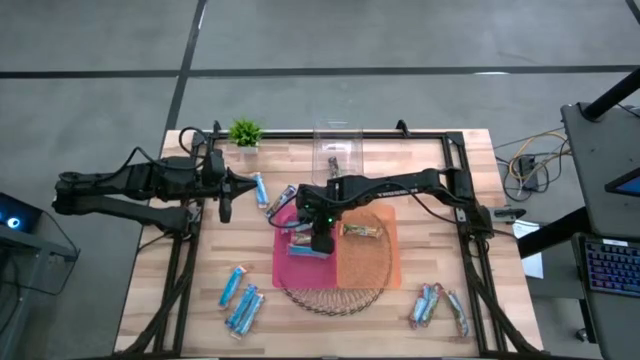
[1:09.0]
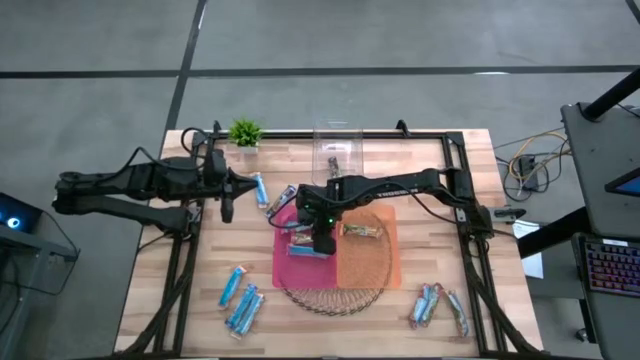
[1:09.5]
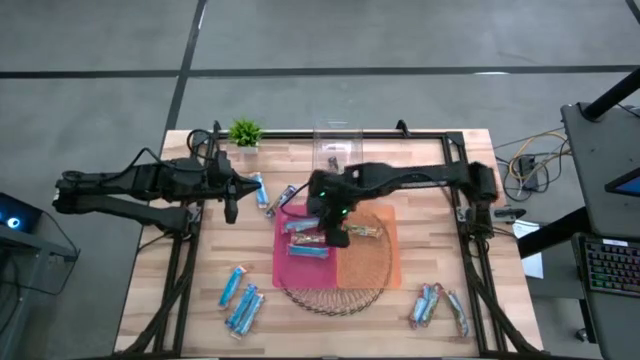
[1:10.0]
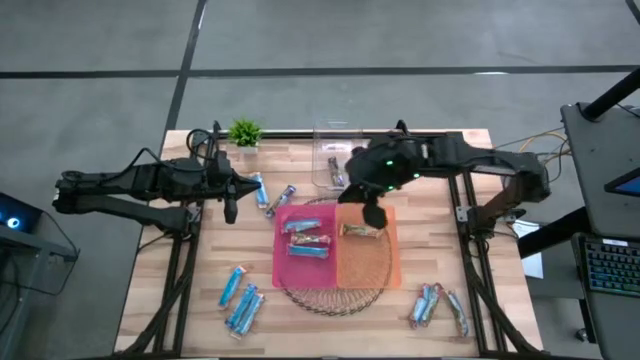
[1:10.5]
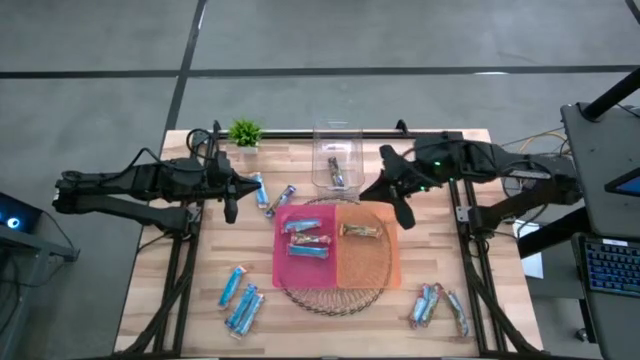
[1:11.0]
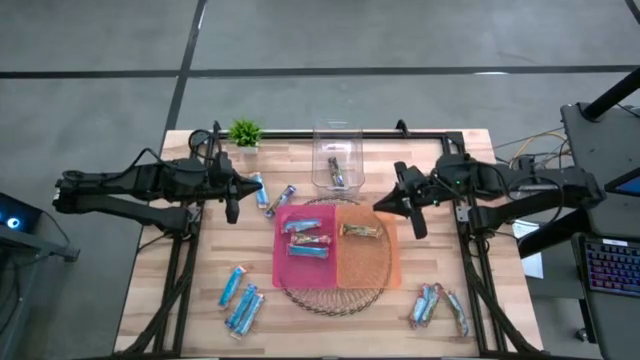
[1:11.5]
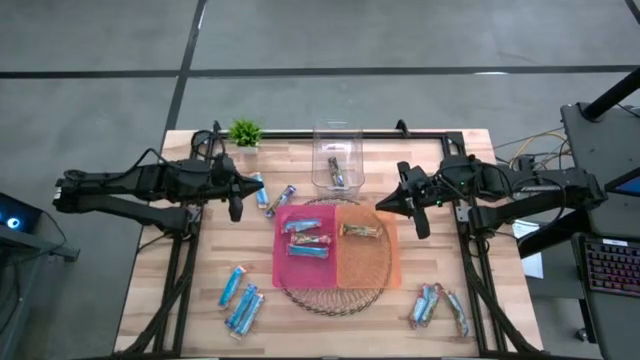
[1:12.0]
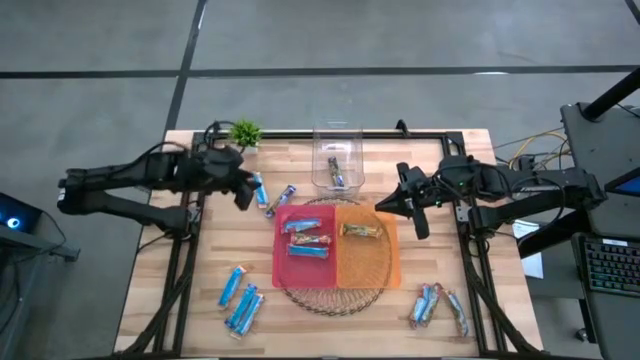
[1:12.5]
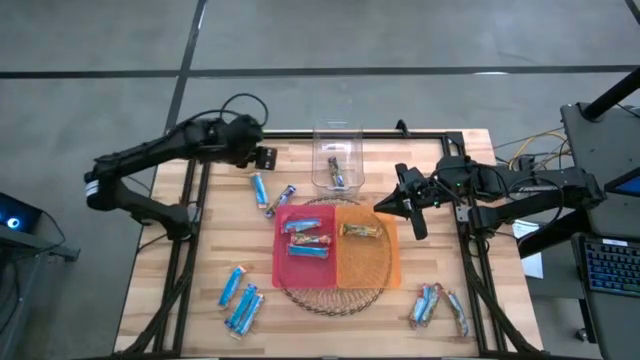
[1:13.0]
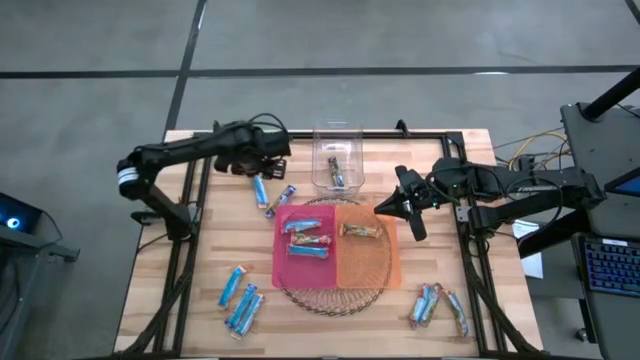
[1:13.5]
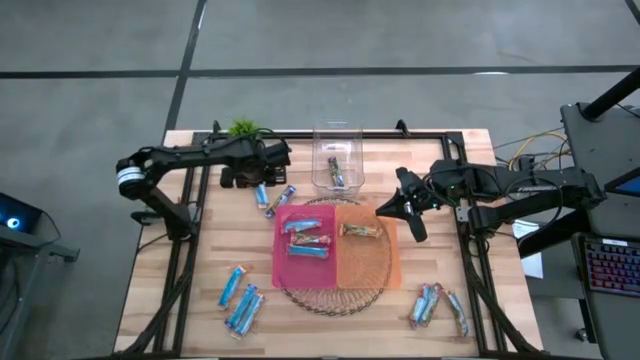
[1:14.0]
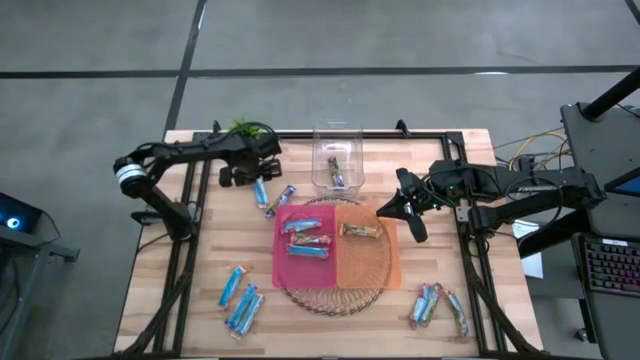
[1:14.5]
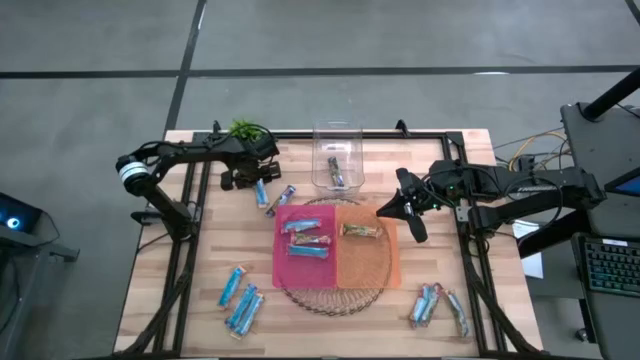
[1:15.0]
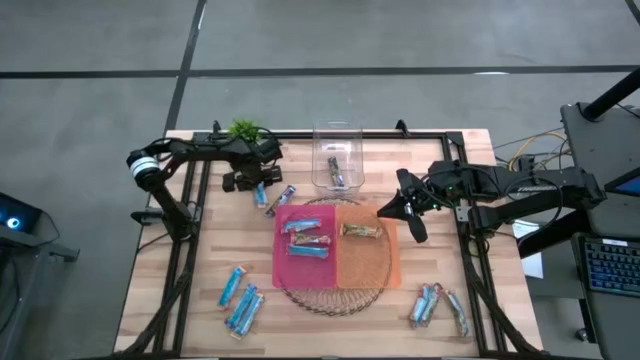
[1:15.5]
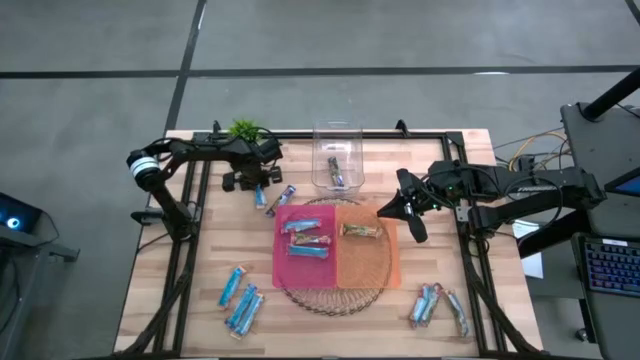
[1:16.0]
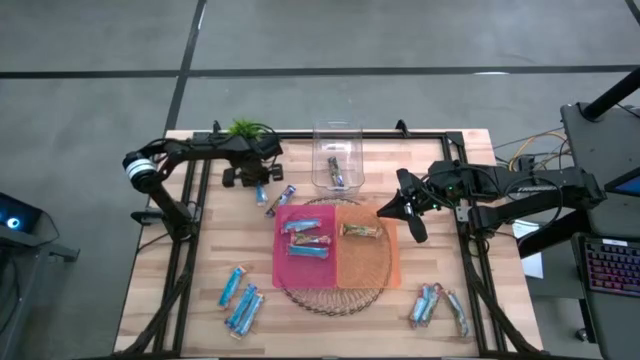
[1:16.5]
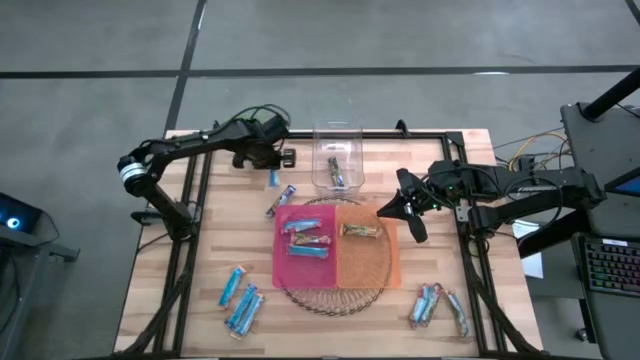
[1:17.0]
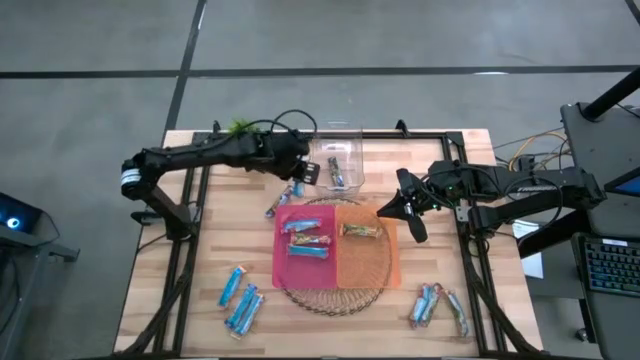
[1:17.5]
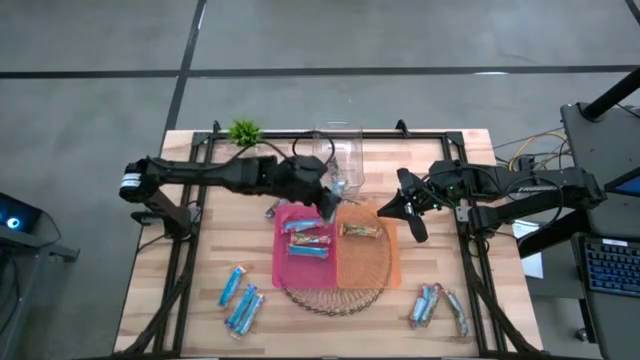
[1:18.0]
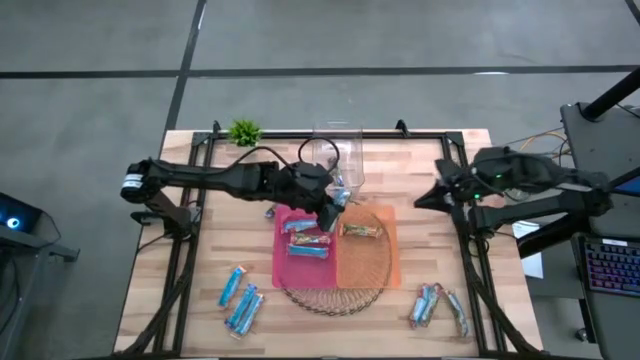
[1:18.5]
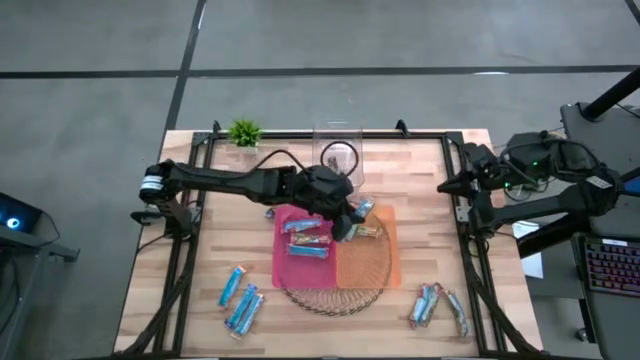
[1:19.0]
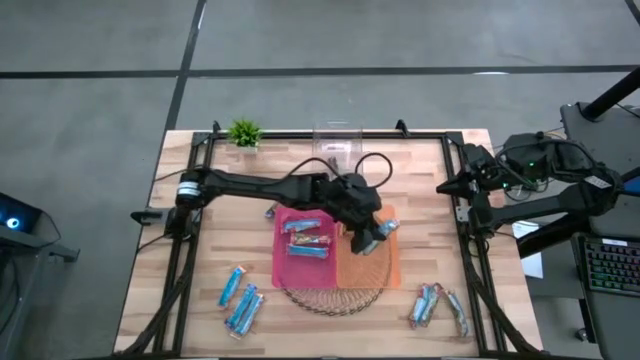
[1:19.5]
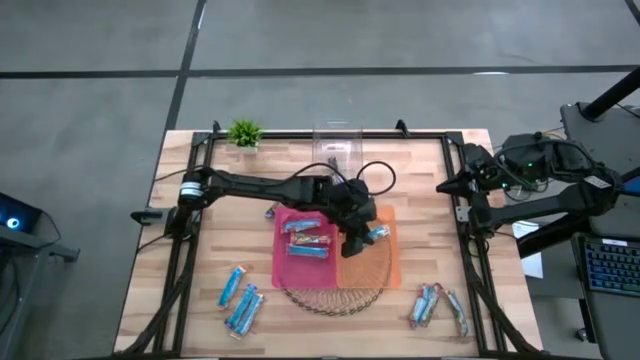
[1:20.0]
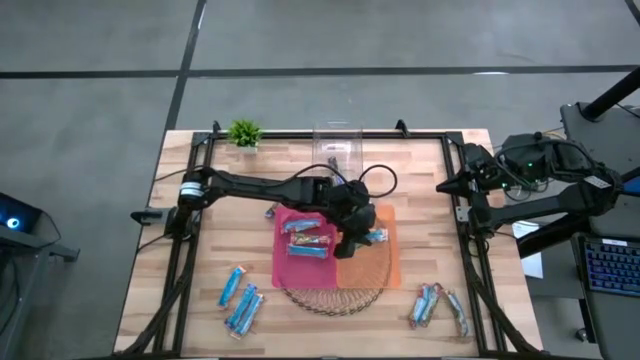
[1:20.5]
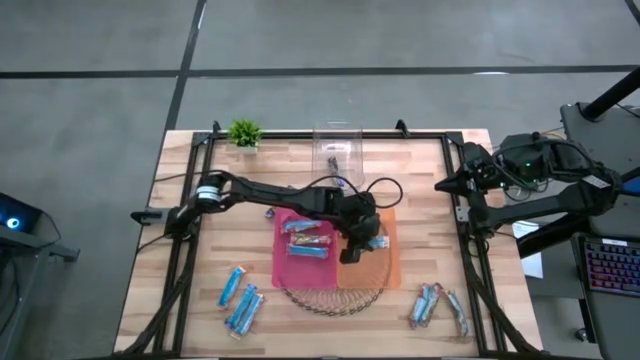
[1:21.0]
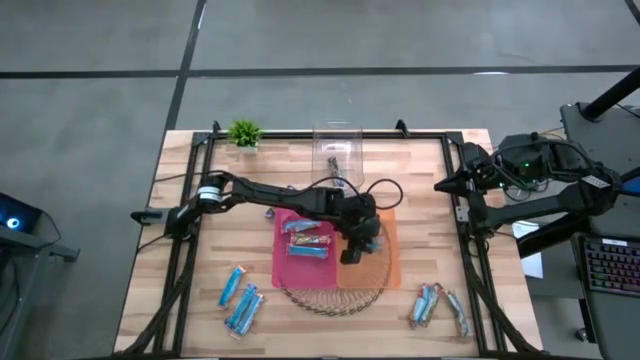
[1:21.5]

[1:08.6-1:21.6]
Task: Pick and place Granola Bars by type
Put the yellow granola bar into the orange bin

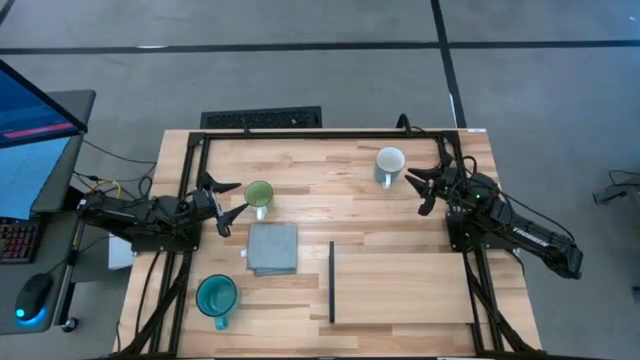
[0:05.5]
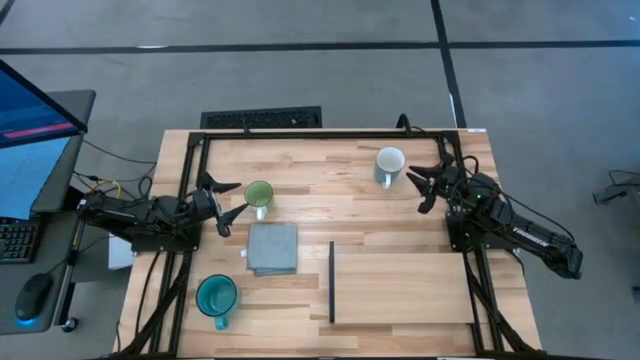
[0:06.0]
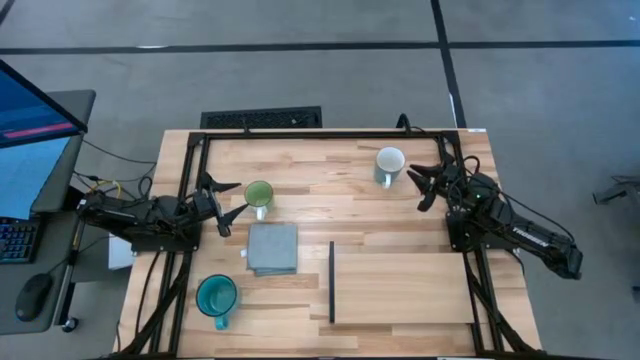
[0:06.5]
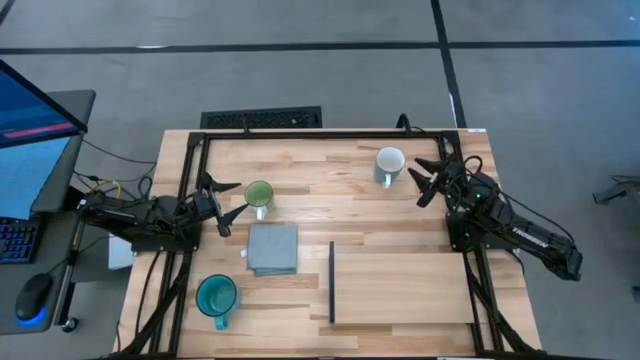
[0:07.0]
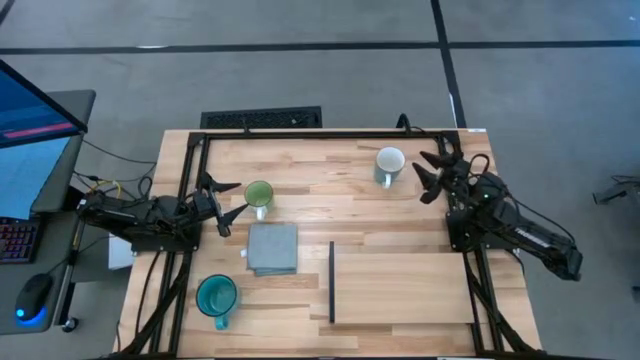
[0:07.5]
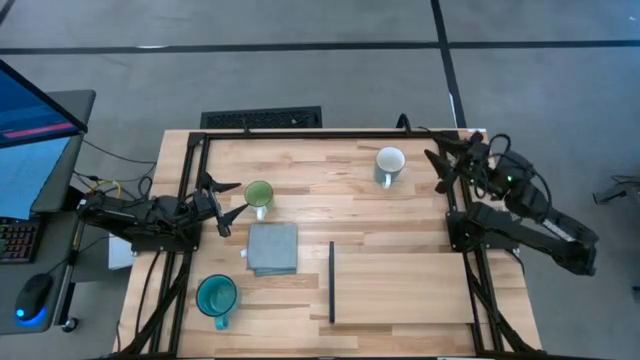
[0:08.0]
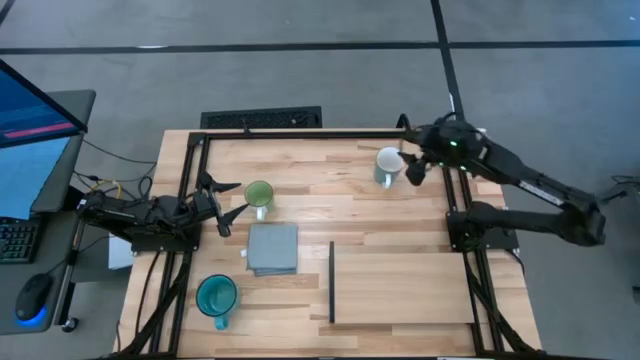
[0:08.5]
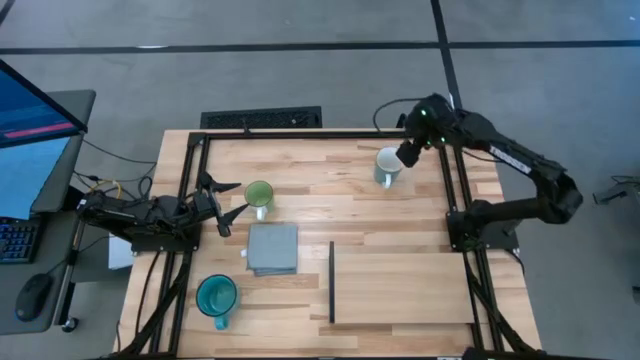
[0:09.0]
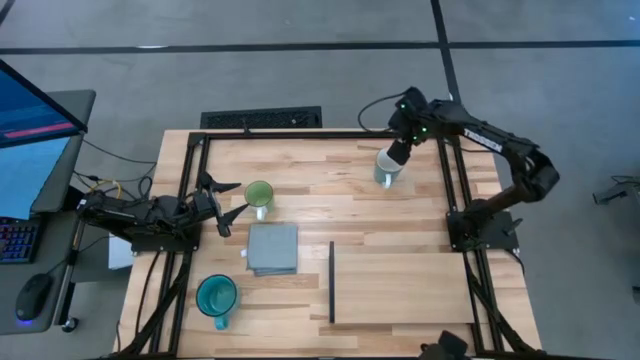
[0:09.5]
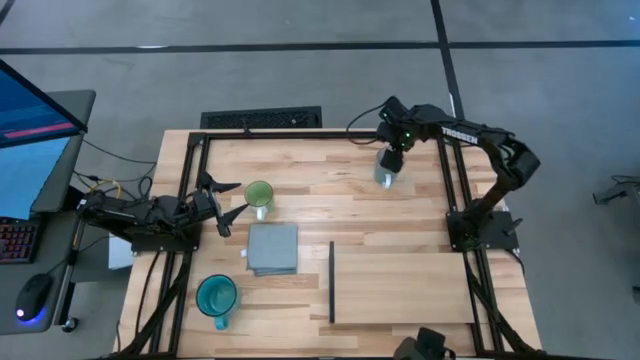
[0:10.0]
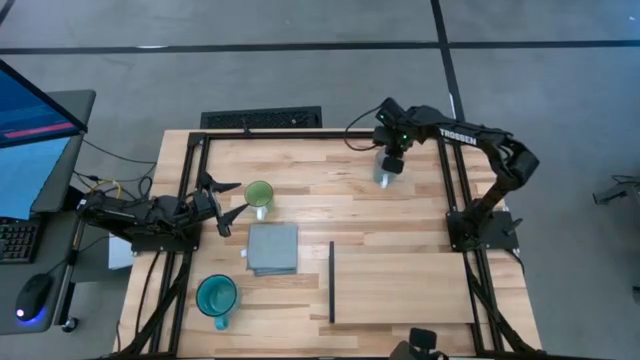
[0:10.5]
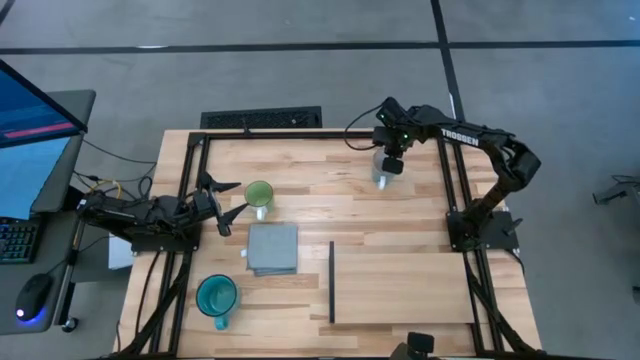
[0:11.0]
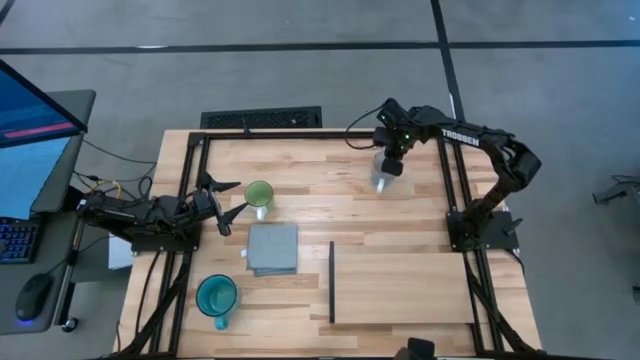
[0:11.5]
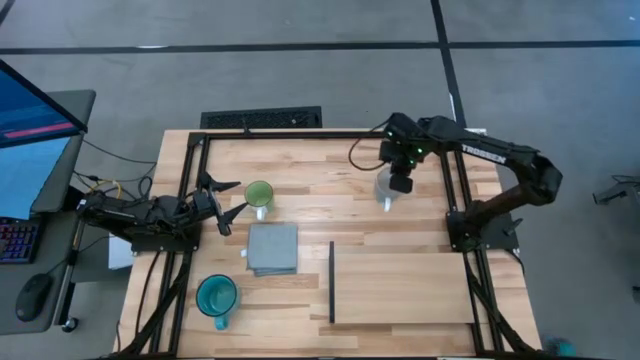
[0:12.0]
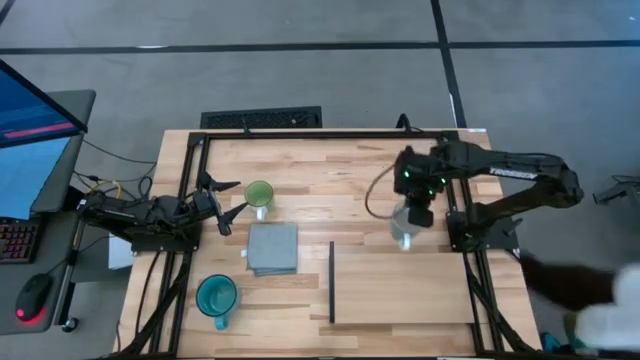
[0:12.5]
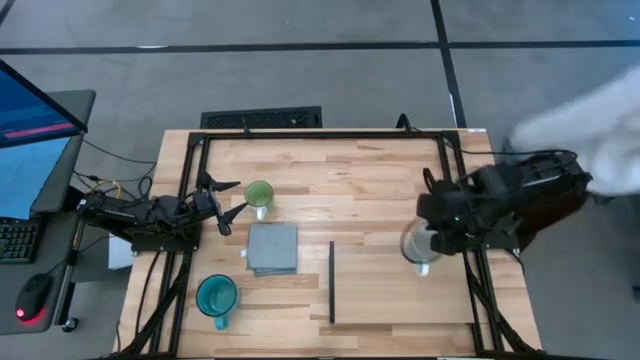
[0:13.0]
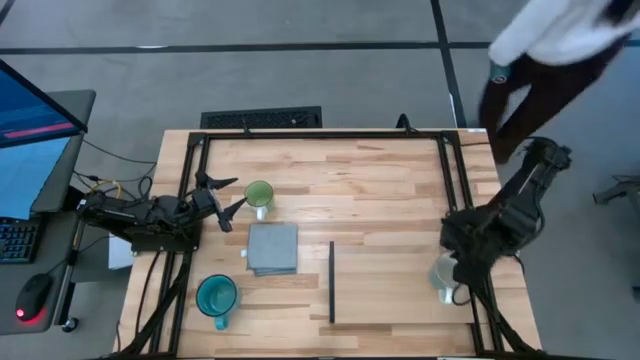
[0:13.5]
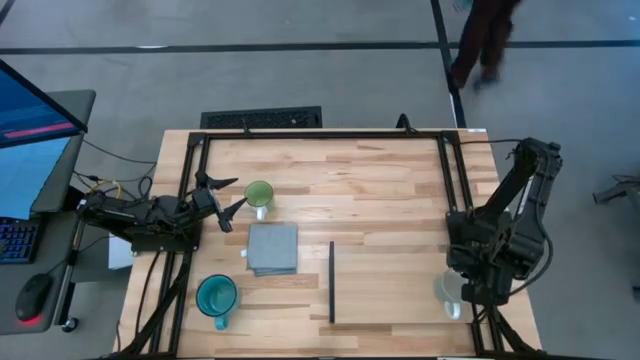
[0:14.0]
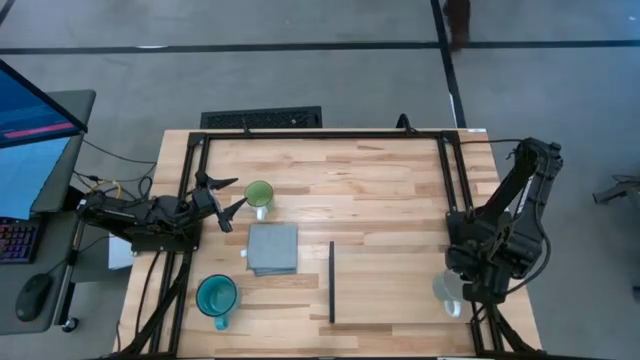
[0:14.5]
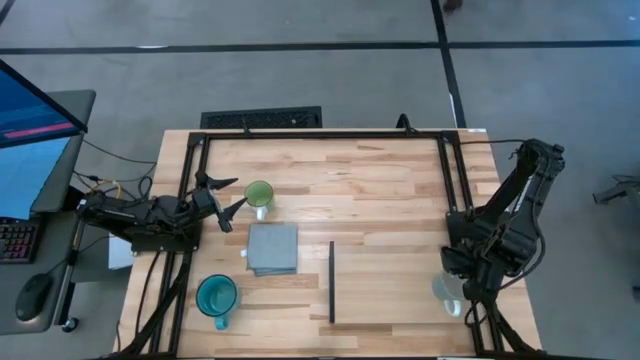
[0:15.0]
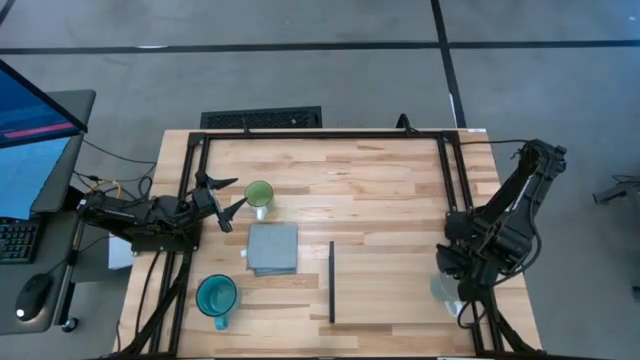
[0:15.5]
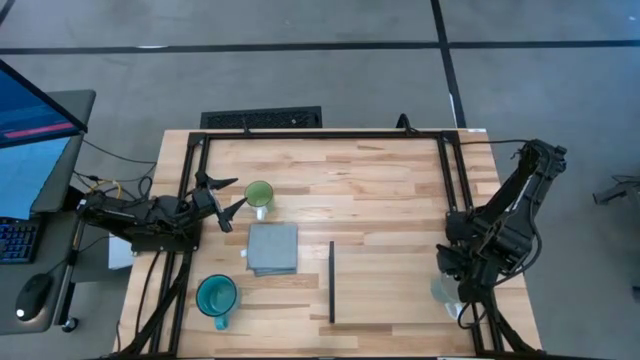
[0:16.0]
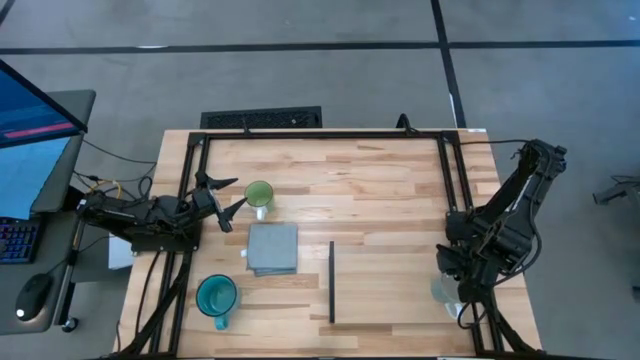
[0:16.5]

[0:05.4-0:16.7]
Task: Stack small to large cups/mugs on shelf
Put the top blue mug on the shelf
